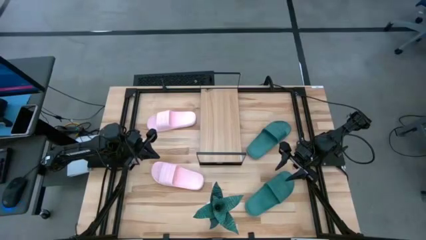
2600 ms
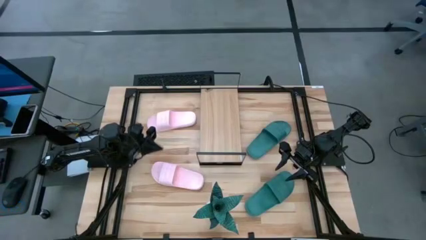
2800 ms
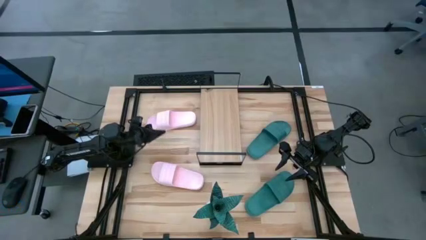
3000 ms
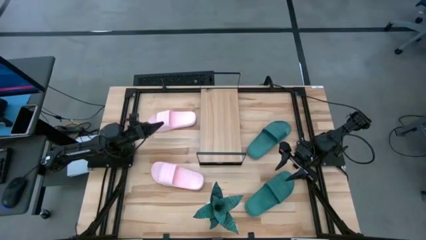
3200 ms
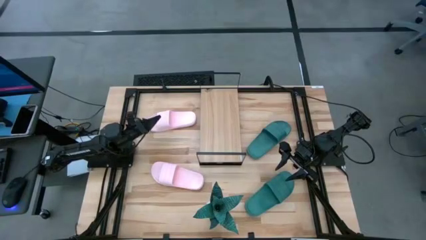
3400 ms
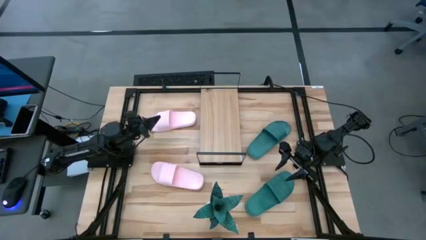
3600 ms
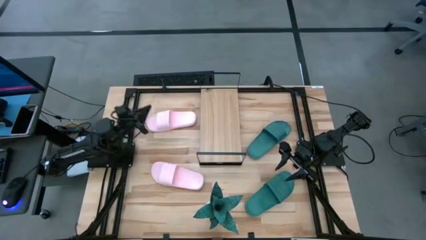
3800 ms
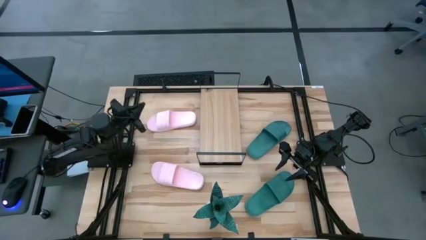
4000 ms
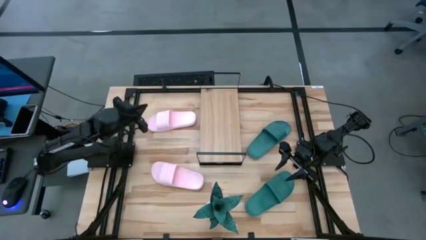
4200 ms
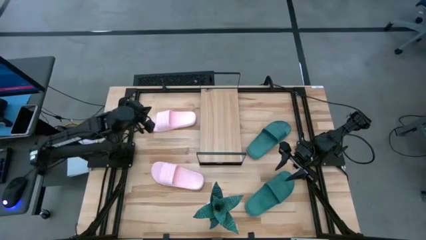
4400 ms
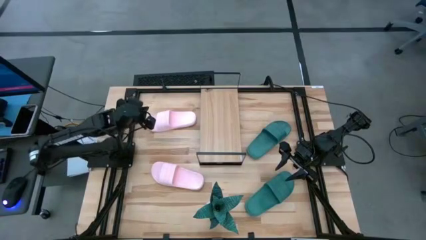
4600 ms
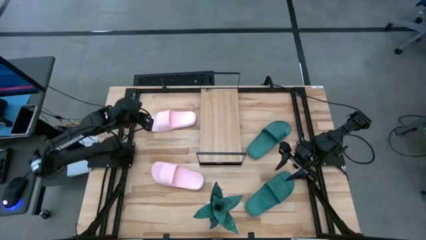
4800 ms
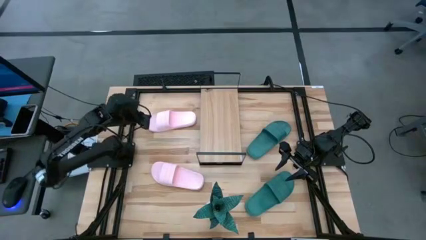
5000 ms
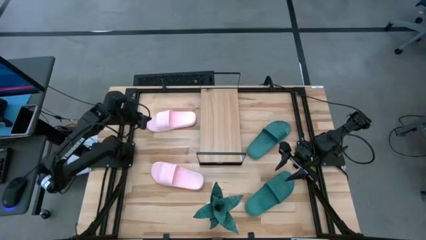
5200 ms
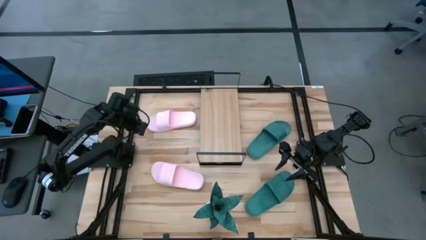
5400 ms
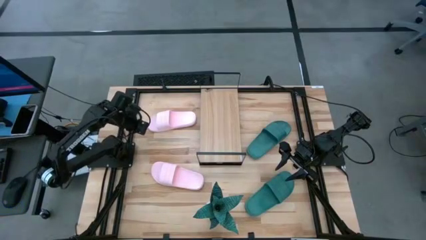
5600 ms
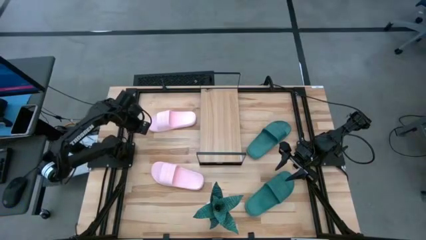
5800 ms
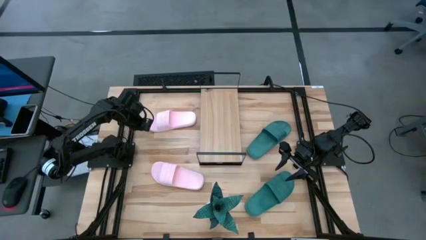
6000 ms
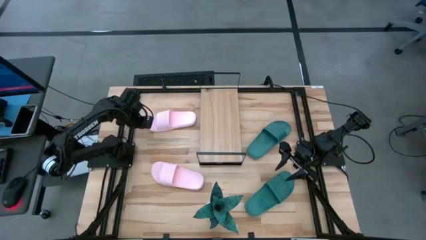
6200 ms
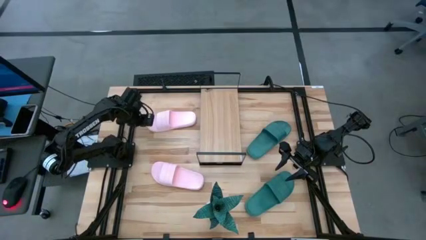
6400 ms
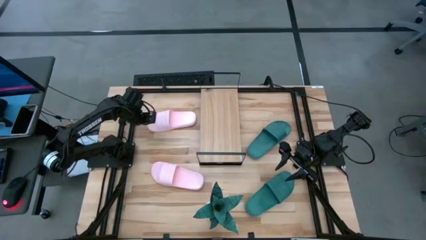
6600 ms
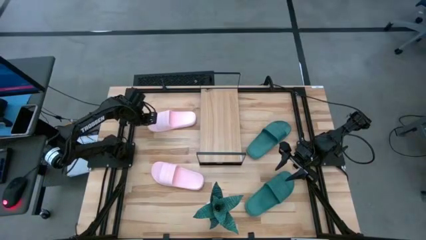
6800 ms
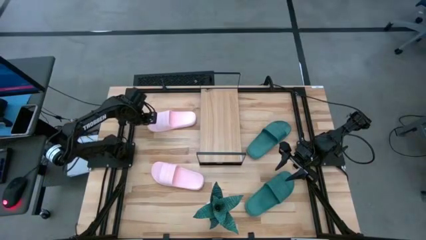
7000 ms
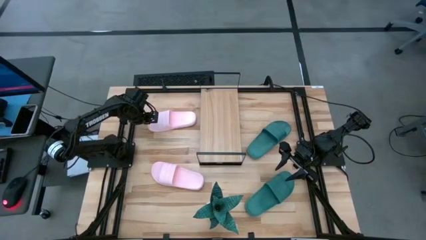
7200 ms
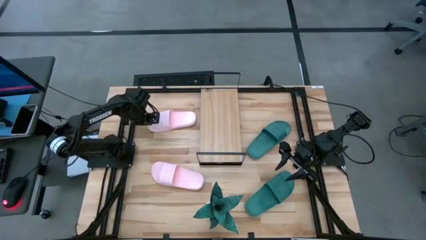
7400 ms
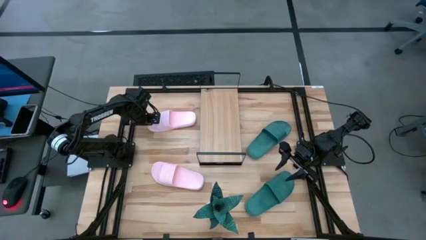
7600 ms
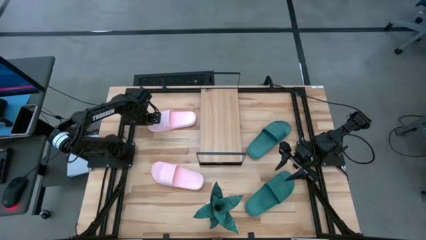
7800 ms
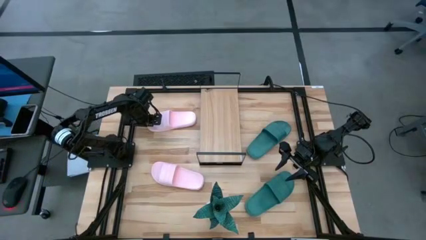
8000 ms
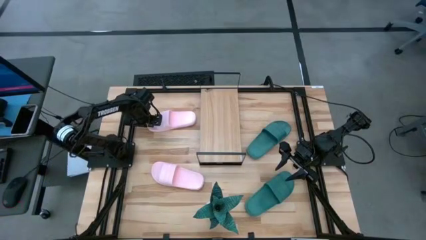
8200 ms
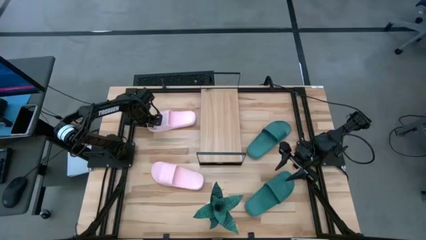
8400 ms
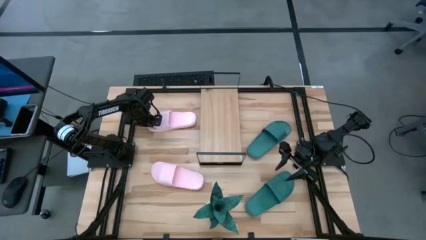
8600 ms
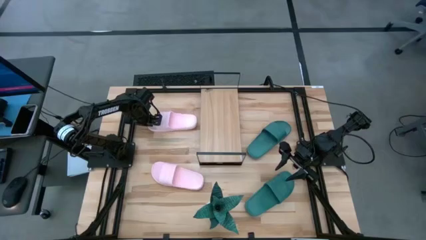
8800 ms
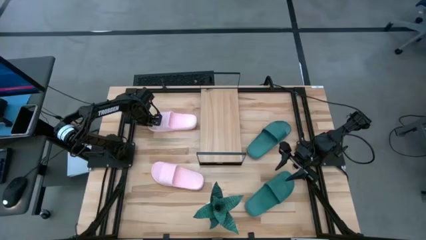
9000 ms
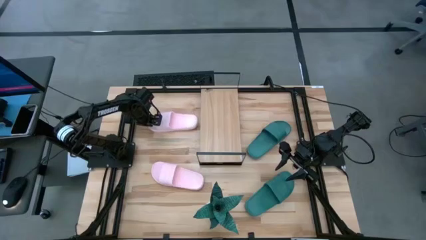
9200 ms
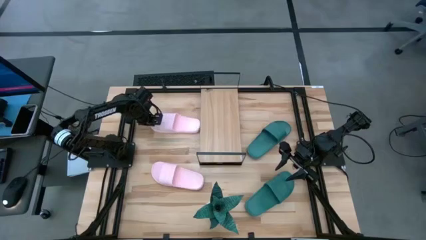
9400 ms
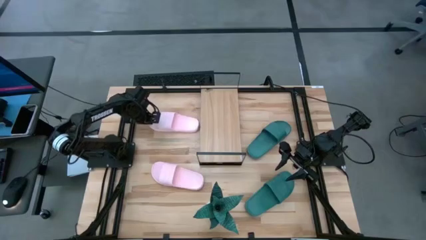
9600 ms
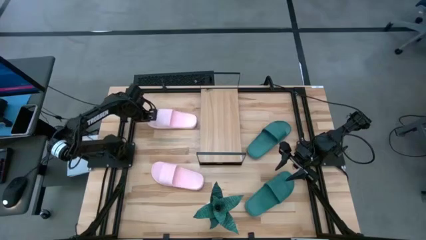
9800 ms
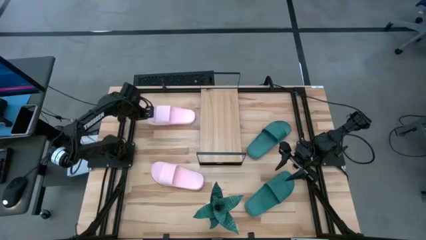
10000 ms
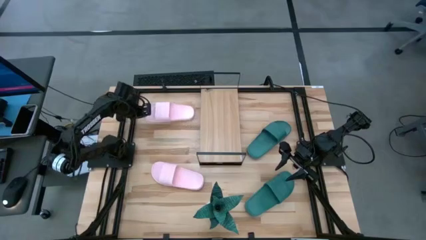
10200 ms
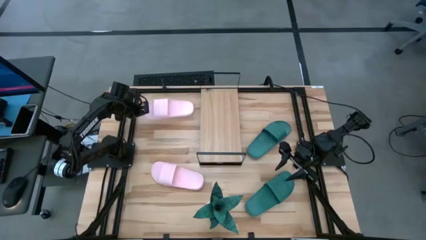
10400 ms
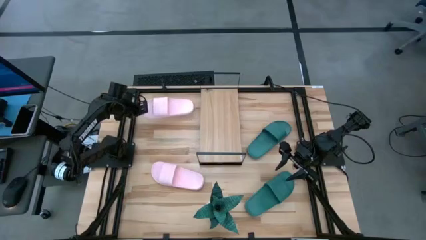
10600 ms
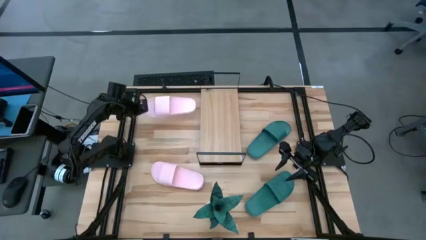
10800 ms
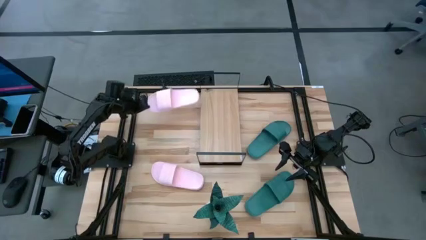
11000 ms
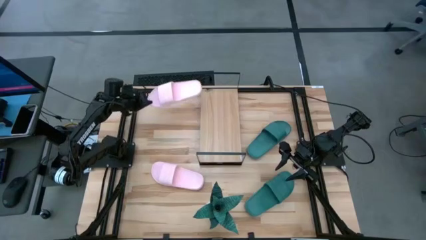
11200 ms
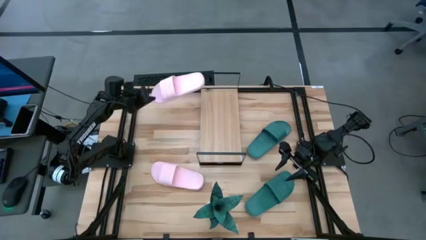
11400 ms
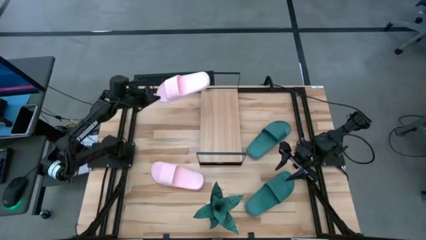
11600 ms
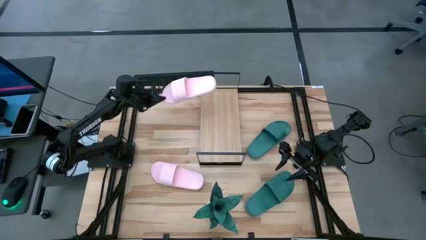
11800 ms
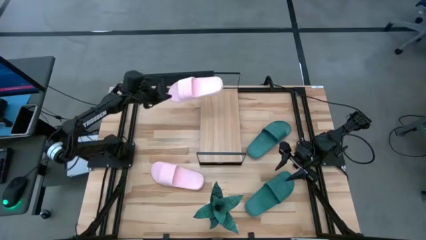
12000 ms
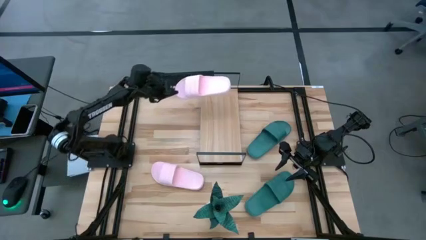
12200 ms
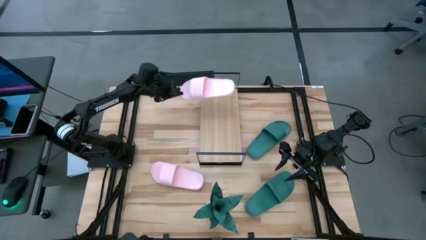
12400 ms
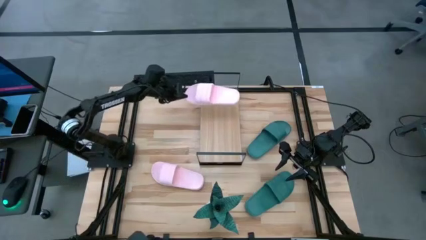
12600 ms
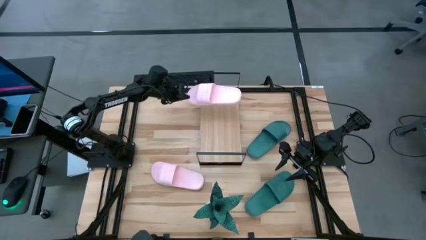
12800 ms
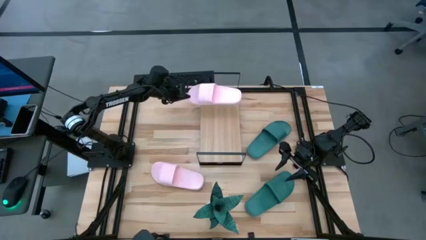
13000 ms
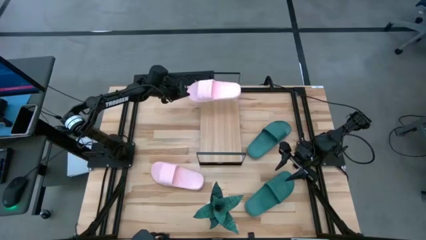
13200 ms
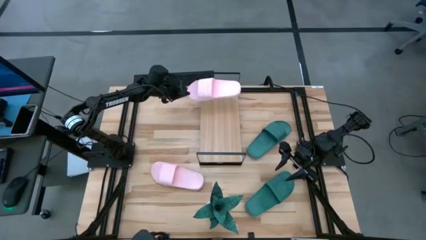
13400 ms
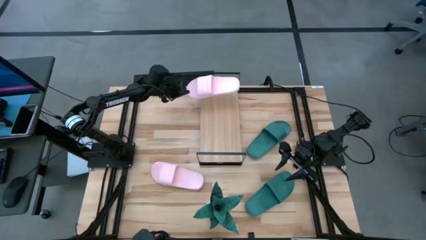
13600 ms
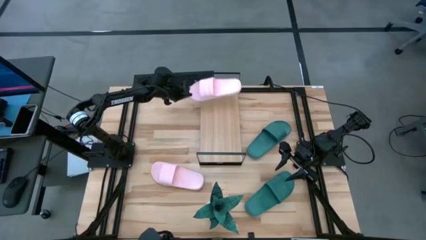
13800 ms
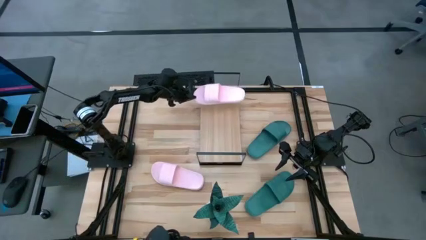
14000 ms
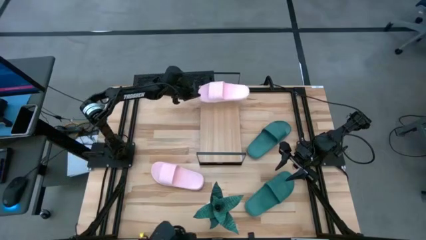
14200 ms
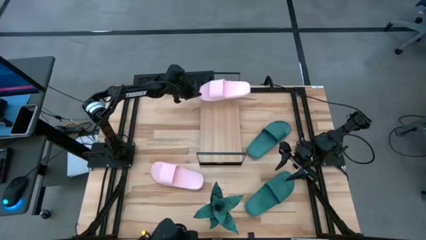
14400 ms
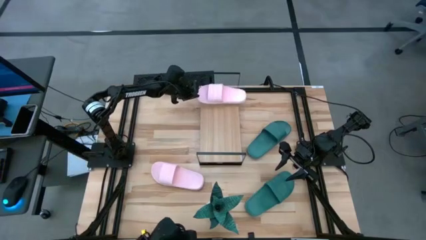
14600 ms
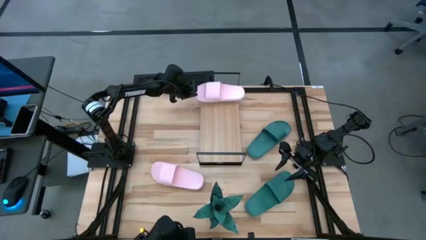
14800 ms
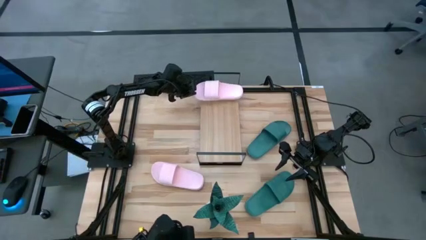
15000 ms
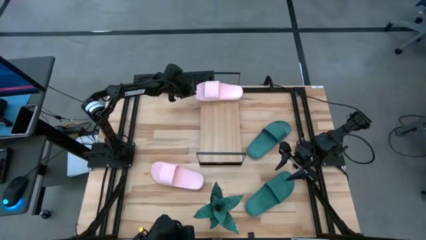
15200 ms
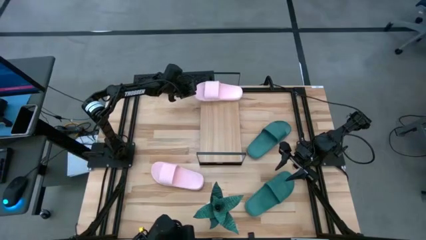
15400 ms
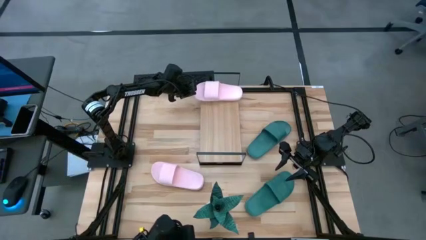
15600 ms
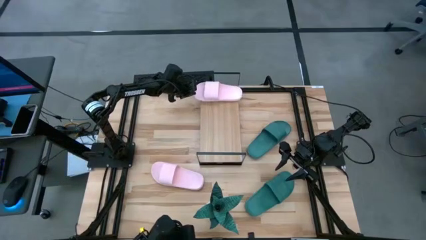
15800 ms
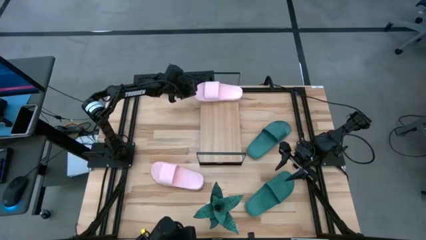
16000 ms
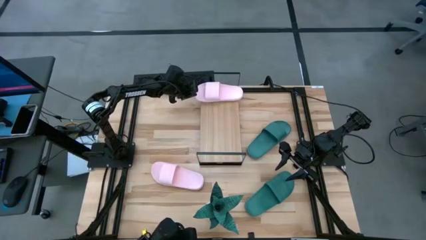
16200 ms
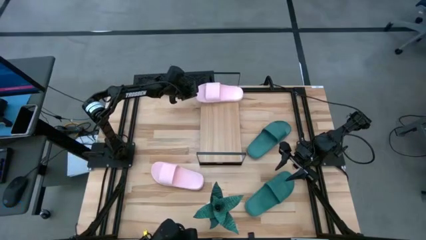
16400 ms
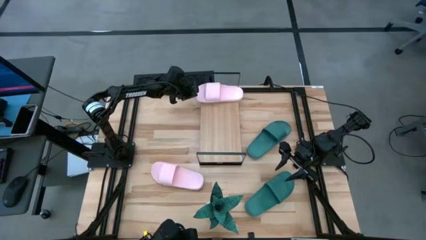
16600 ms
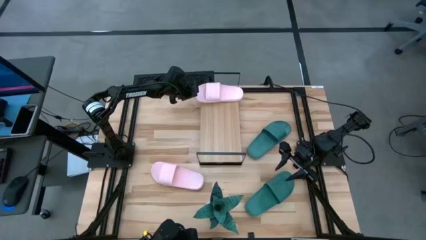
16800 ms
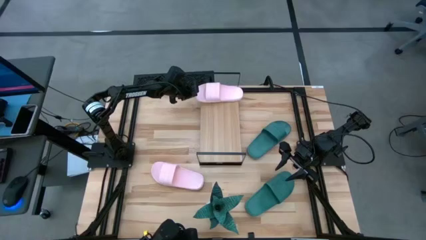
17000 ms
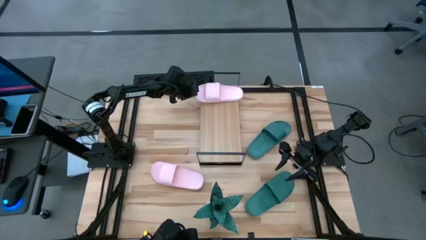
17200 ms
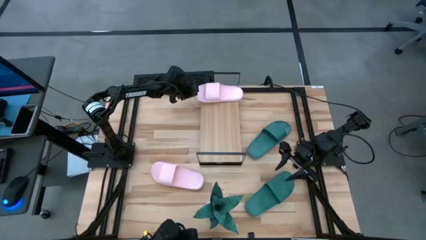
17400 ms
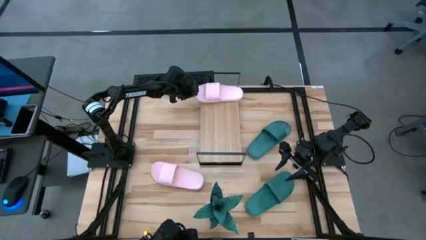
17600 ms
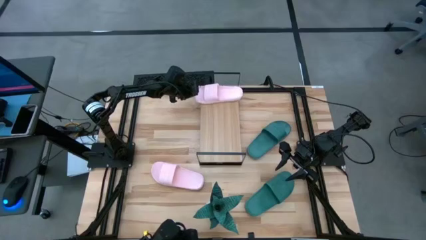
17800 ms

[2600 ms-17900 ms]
Task: Pick and place slides into the shelf
Put the top pink slipper on the shelf
